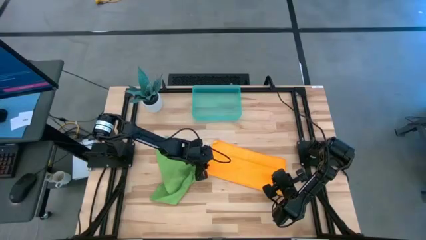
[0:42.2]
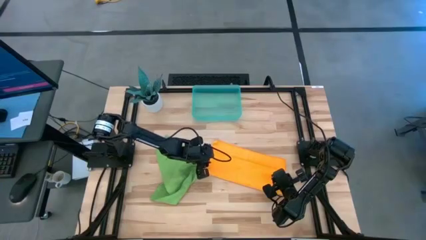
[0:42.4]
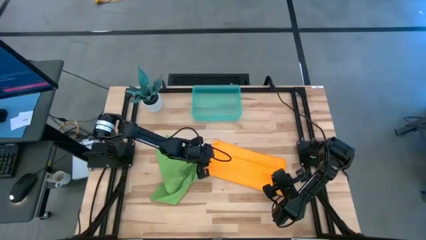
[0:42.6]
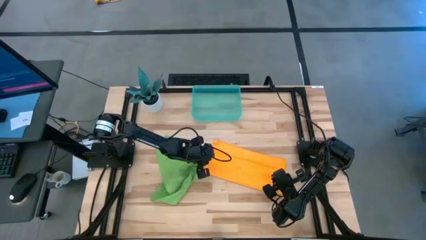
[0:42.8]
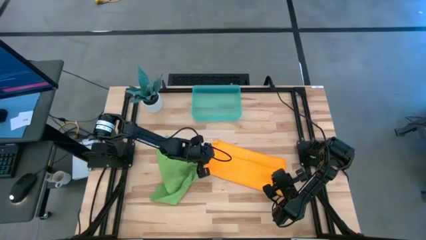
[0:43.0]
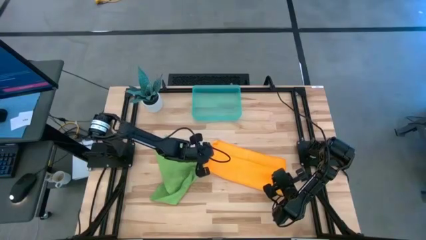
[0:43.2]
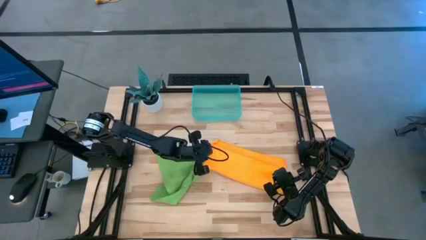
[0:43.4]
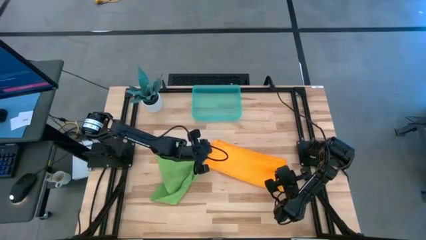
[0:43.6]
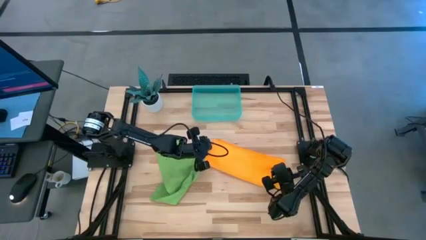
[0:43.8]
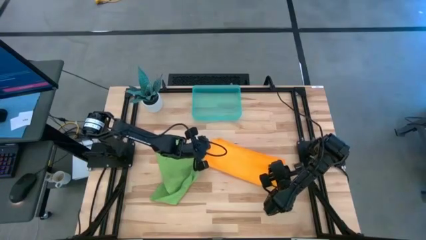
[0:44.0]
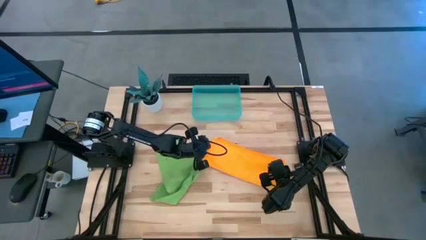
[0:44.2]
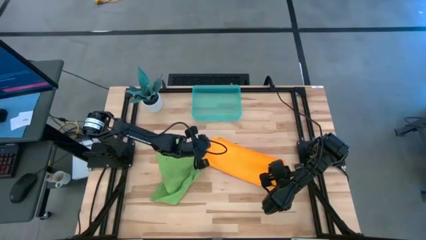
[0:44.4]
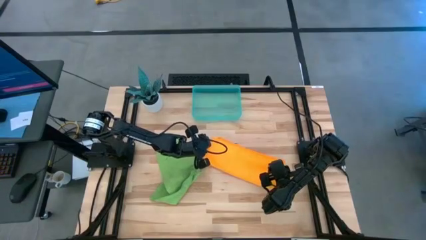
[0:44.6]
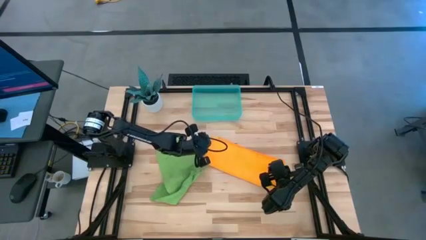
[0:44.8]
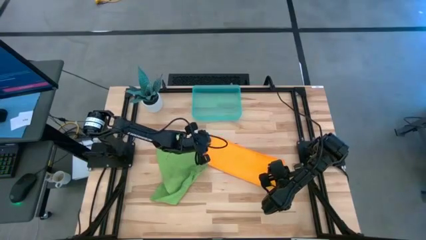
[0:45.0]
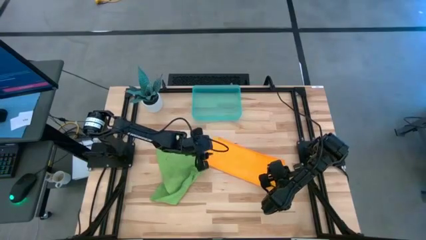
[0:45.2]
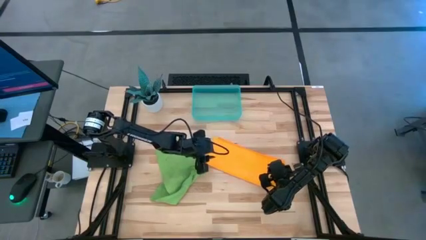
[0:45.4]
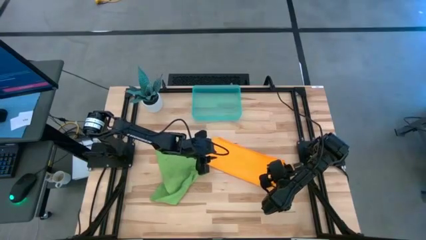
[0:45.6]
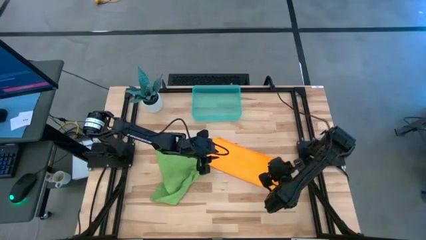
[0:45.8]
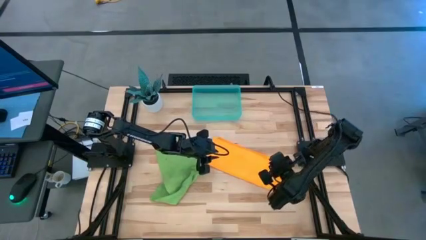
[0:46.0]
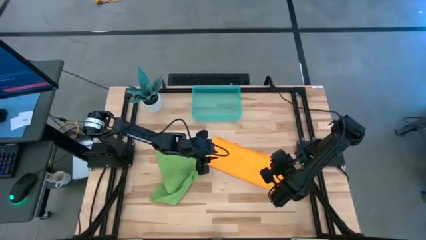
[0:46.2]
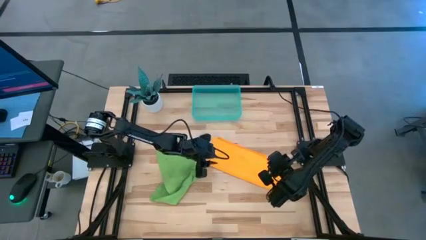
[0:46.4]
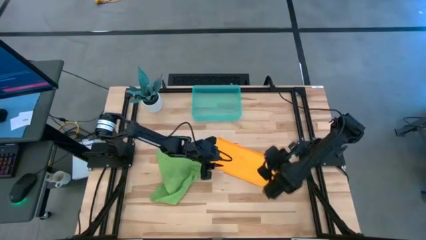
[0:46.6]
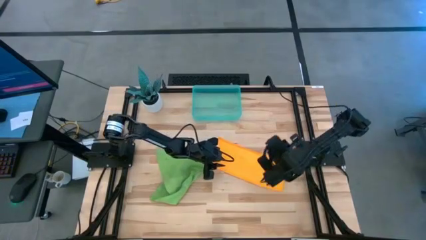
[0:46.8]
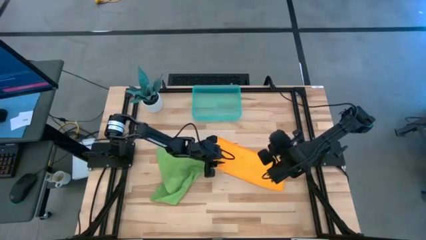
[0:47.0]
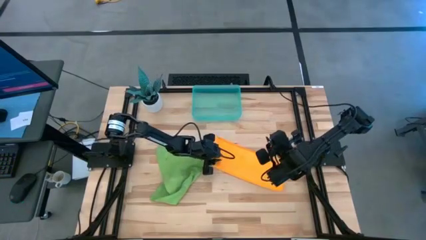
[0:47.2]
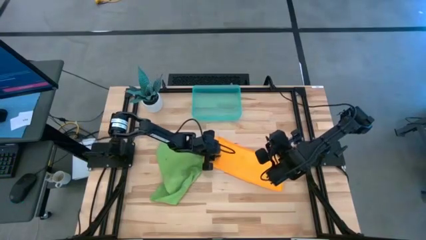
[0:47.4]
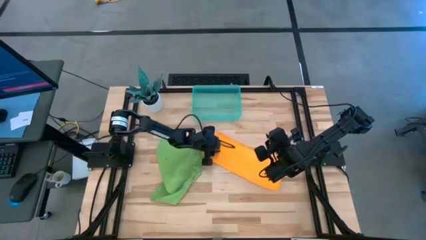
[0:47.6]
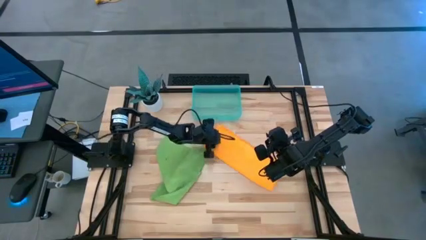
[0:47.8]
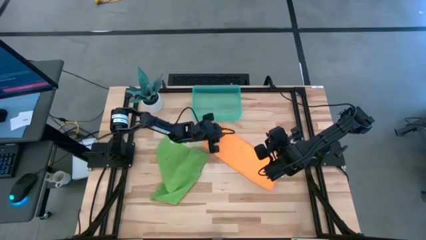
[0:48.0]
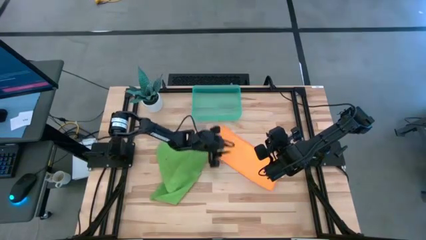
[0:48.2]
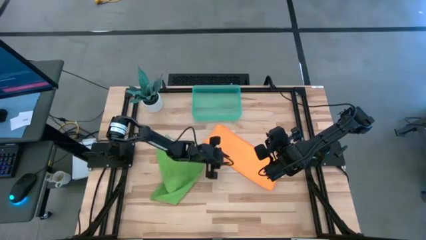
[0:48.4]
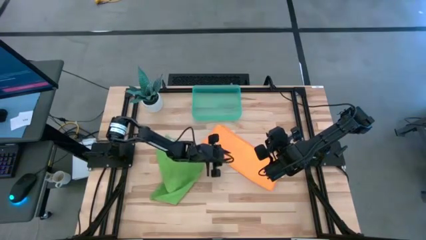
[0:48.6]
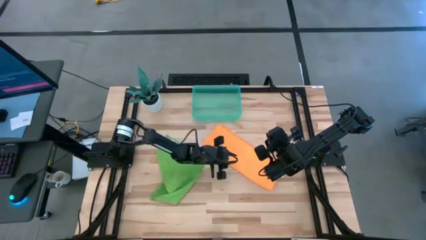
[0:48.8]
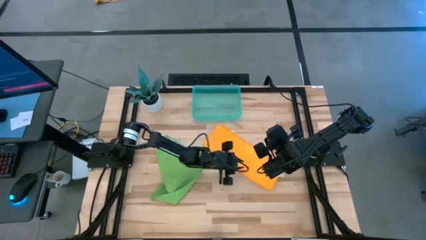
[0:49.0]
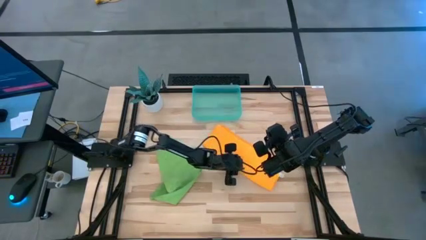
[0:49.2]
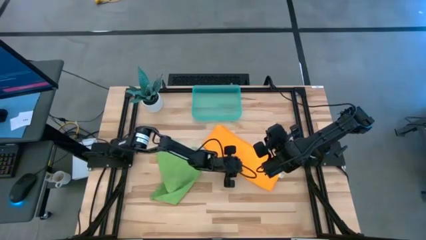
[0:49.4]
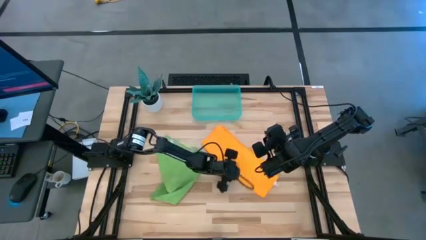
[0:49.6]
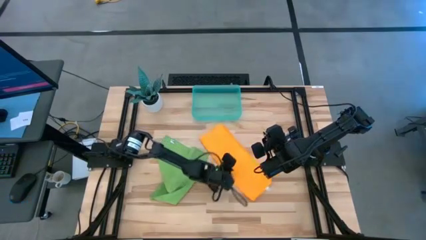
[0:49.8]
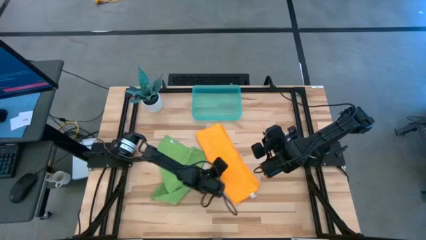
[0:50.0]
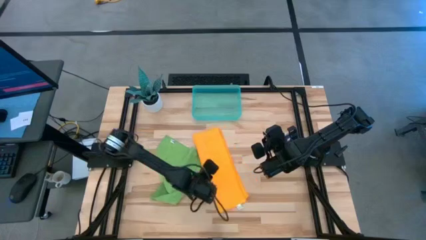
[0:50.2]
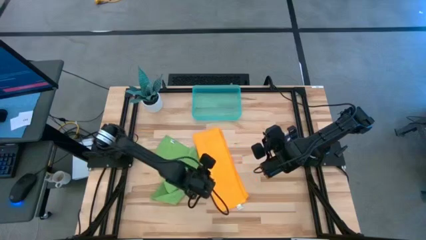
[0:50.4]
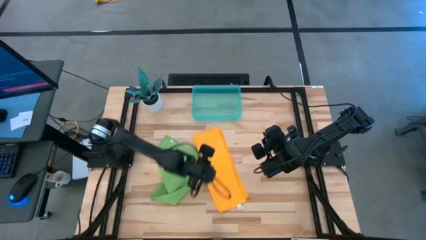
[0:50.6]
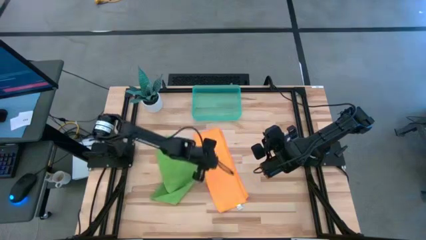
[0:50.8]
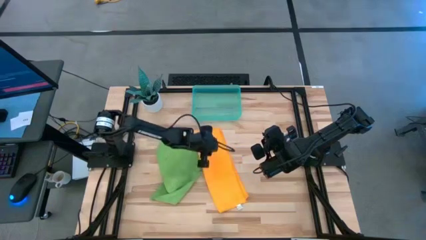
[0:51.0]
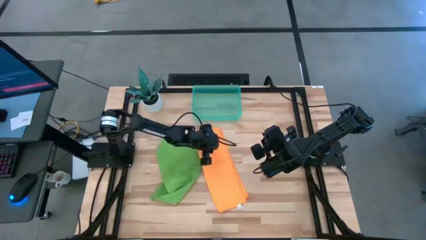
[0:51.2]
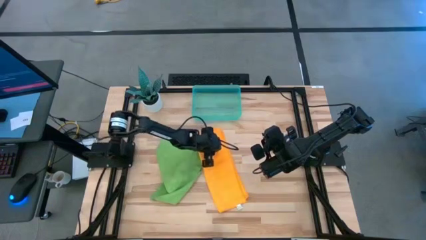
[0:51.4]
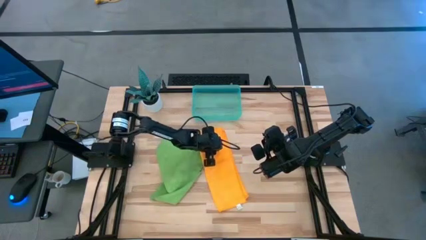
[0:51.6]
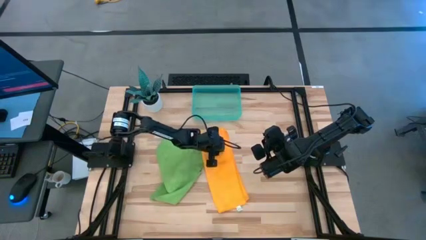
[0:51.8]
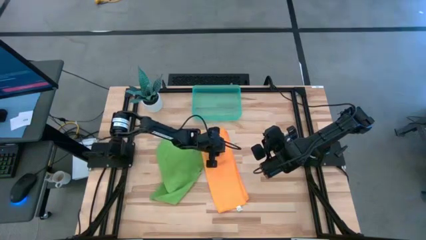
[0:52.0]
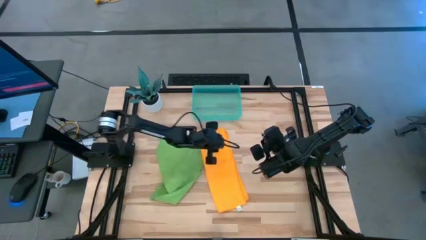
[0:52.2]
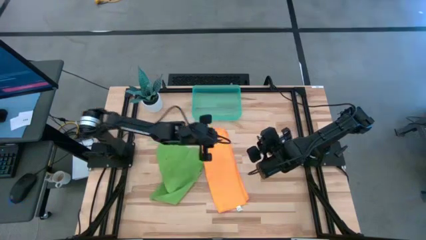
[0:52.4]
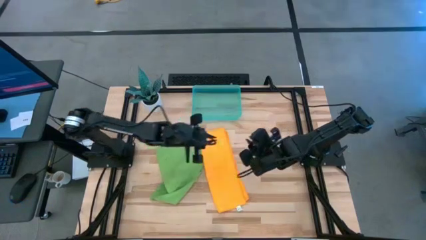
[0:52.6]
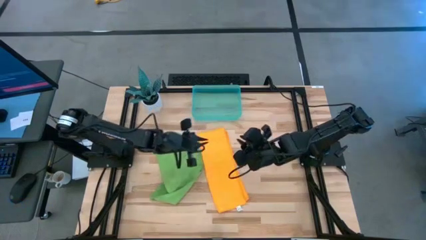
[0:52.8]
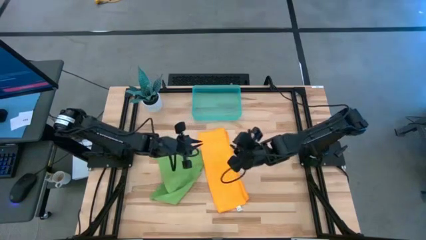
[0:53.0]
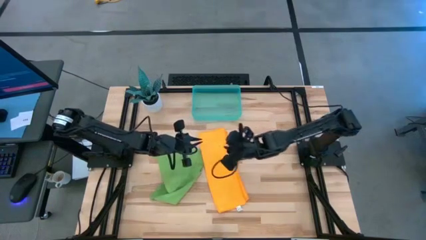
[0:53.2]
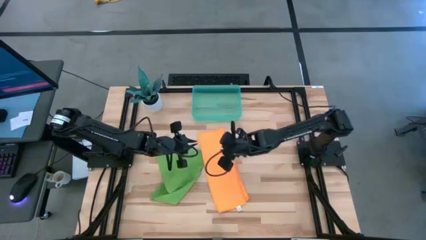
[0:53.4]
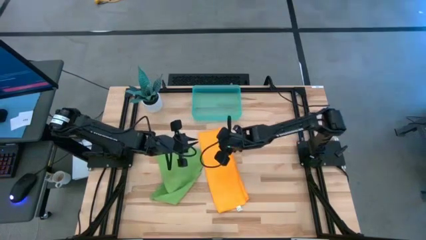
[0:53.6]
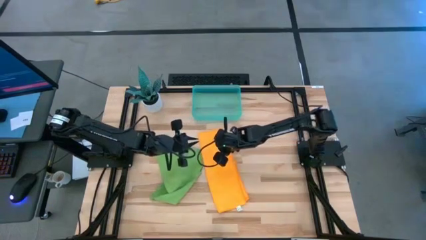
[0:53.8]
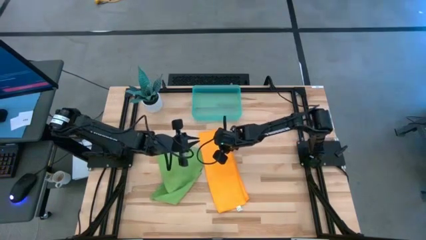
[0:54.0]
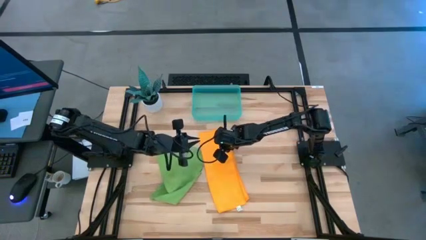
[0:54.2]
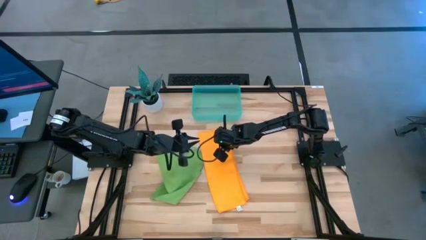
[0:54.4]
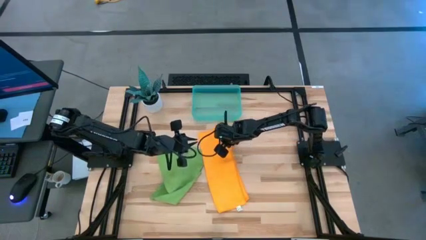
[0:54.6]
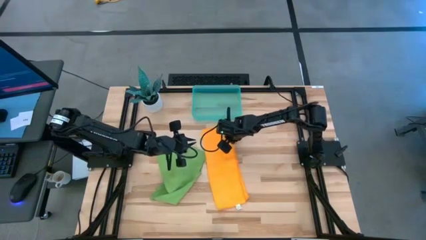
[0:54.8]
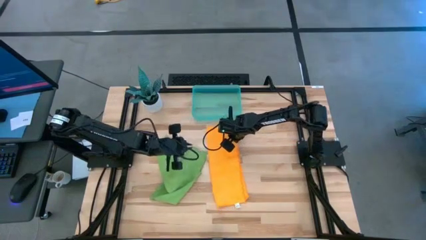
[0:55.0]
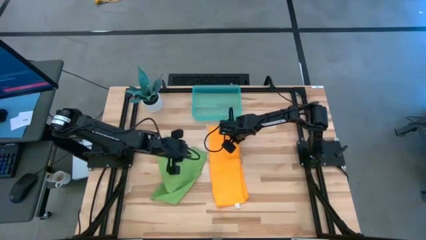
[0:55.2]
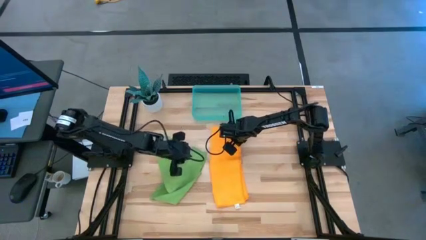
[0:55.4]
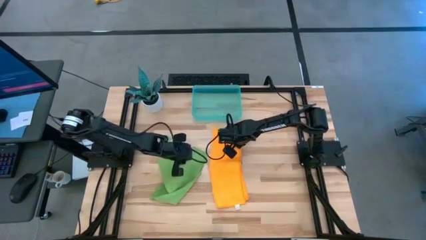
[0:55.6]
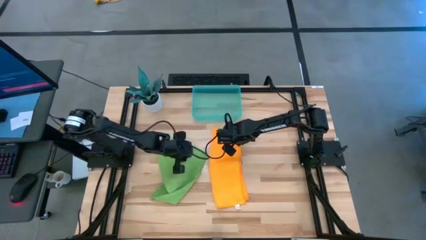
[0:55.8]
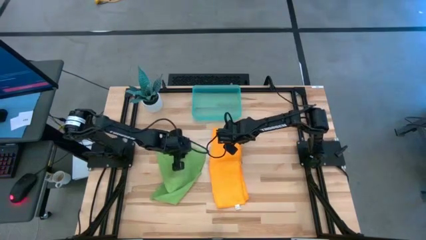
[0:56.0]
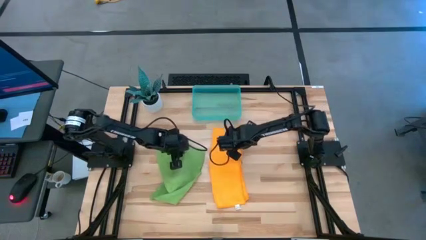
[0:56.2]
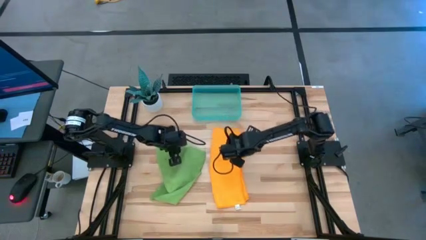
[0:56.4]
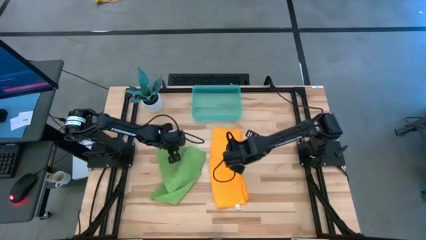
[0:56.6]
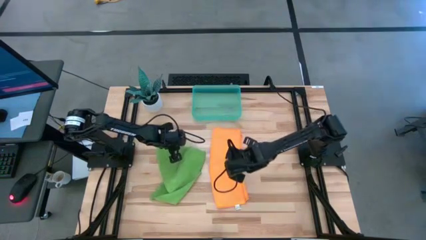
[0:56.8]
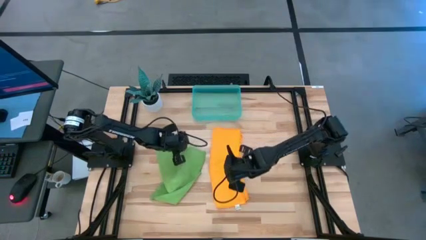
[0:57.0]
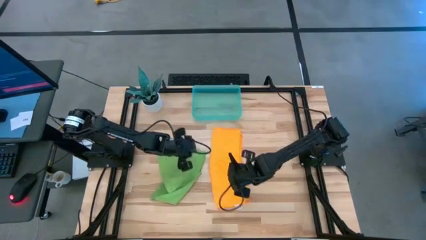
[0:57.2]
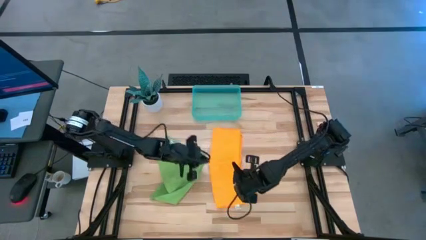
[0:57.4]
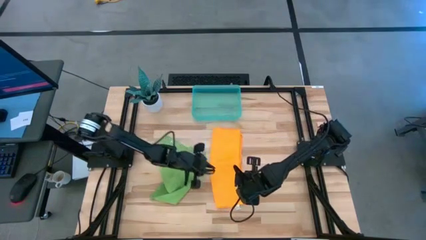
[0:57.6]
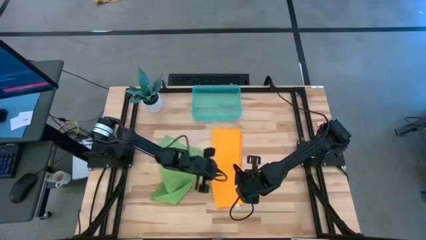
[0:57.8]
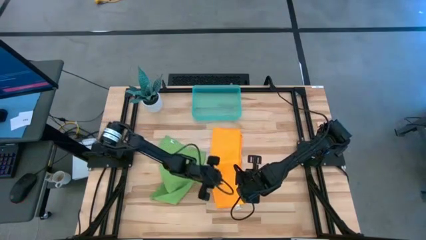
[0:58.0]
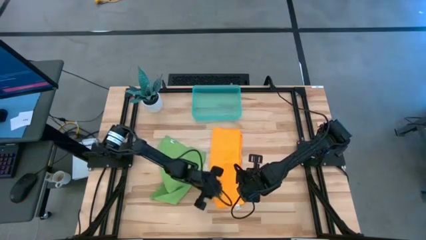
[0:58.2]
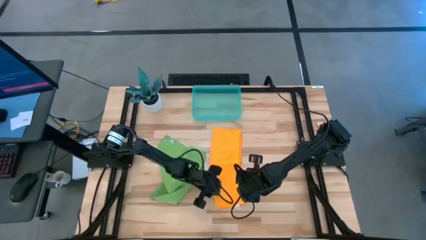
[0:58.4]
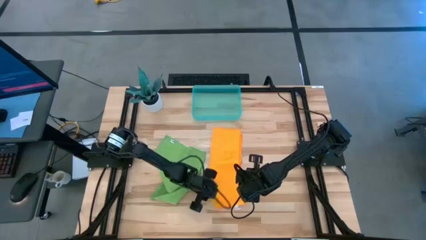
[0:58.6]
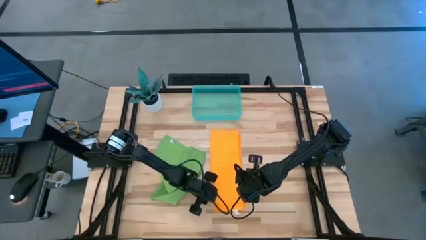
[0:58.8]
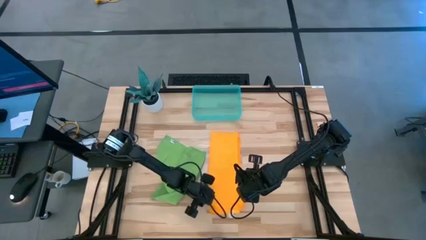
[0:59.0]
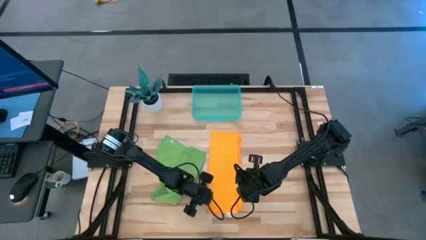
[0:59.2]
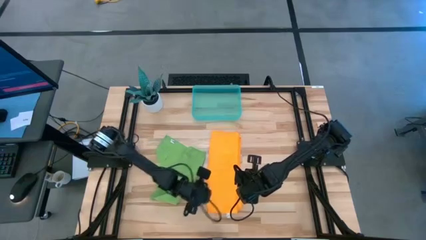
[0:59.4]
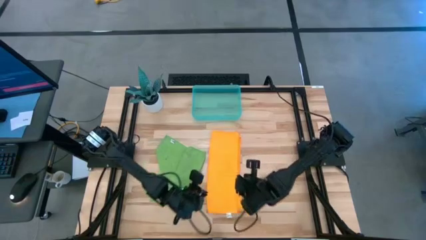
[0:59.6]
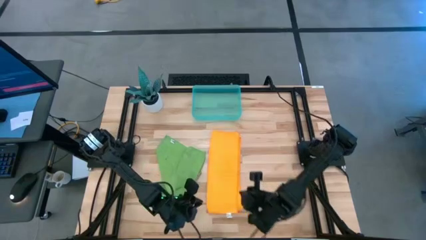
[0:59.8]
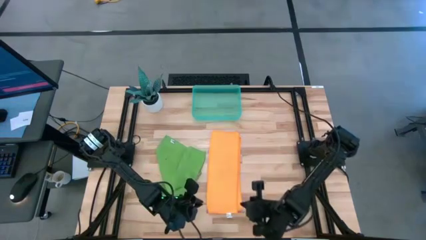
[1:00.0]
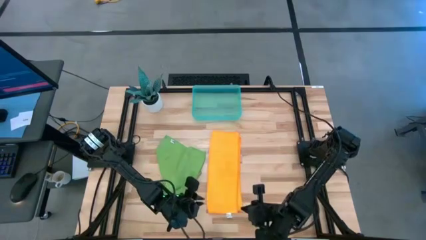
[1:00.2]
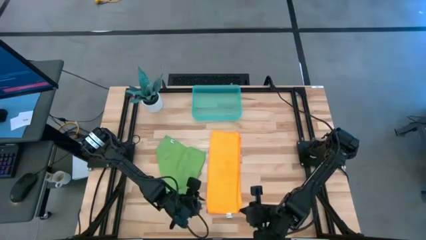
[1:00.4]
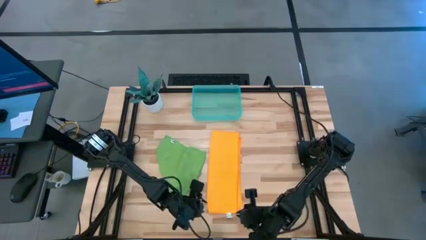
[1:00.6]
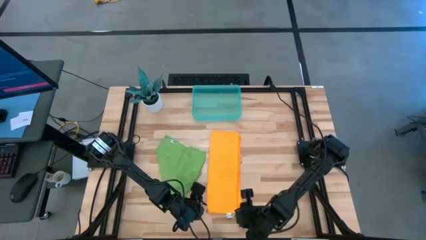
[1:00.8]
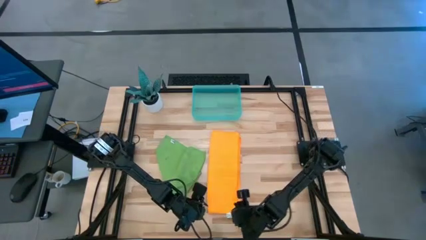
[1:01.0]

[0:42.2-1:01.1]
Task: Roll microfiber towels into tight, uniform cylinder then place into a basket
Roll the orange microfiber cloth
